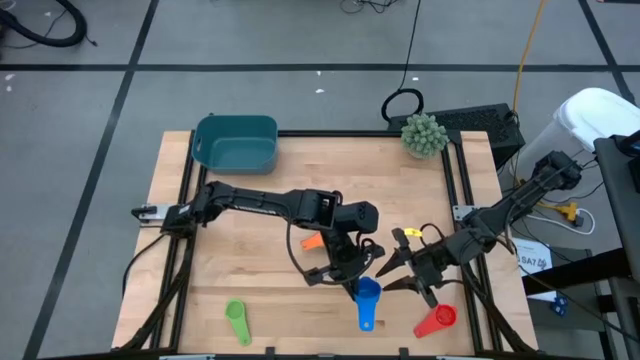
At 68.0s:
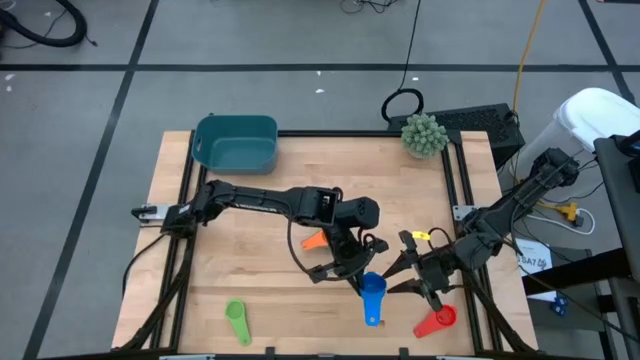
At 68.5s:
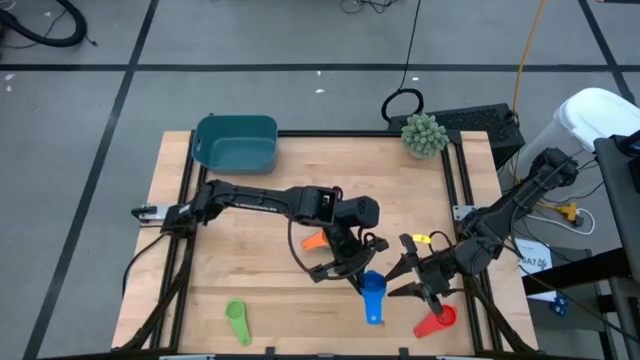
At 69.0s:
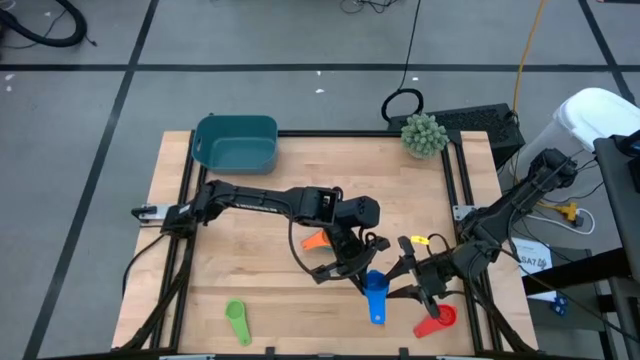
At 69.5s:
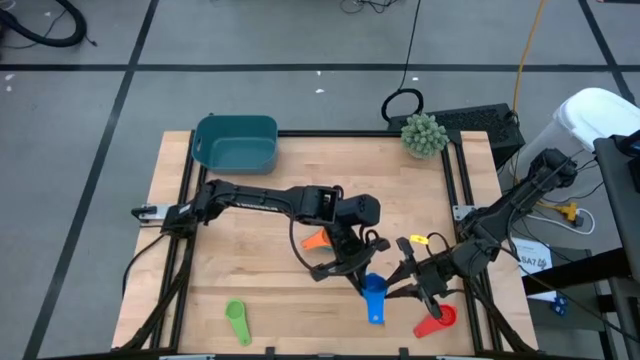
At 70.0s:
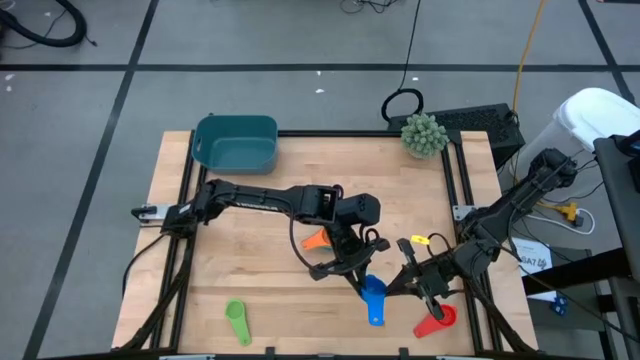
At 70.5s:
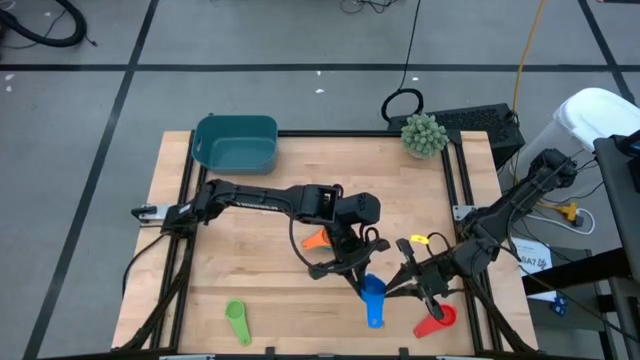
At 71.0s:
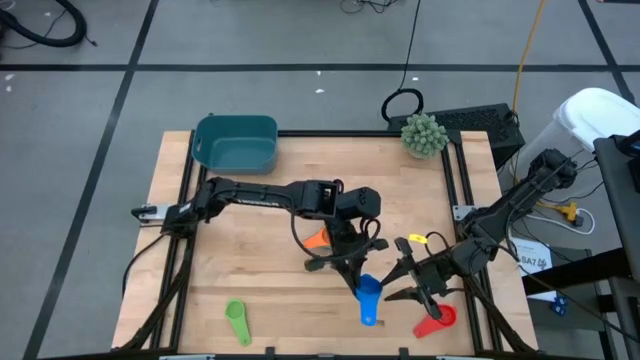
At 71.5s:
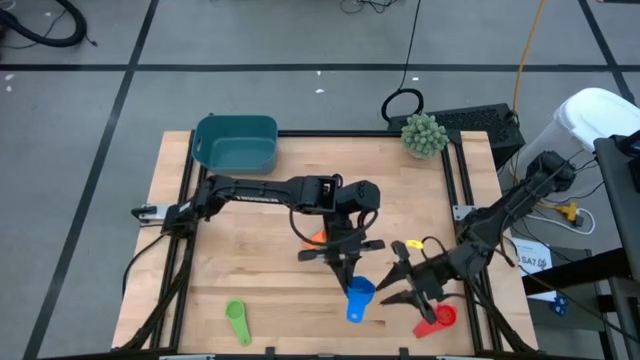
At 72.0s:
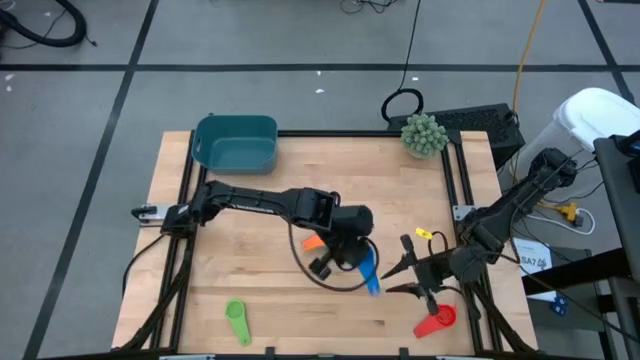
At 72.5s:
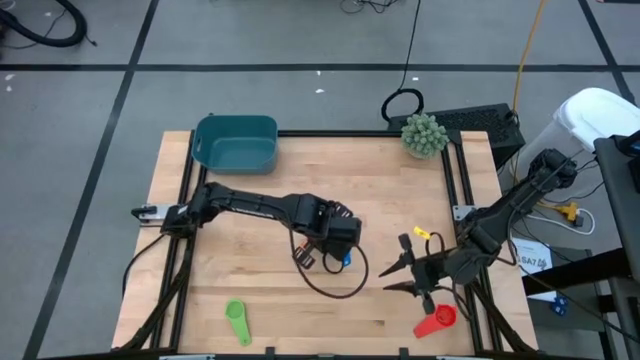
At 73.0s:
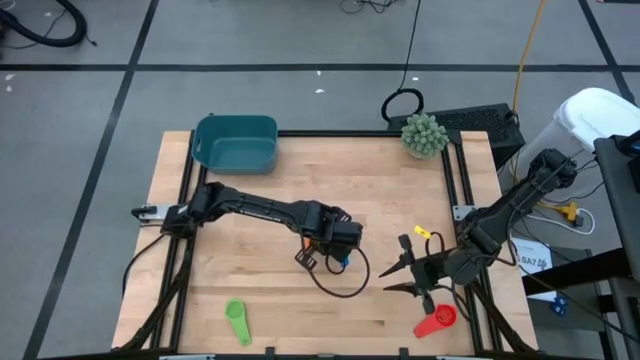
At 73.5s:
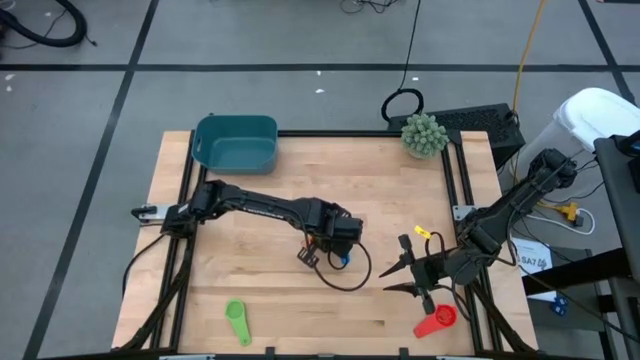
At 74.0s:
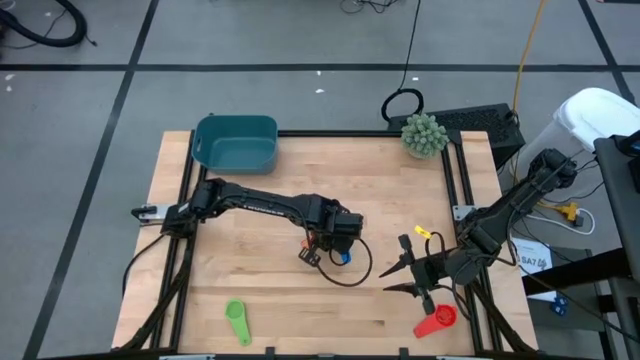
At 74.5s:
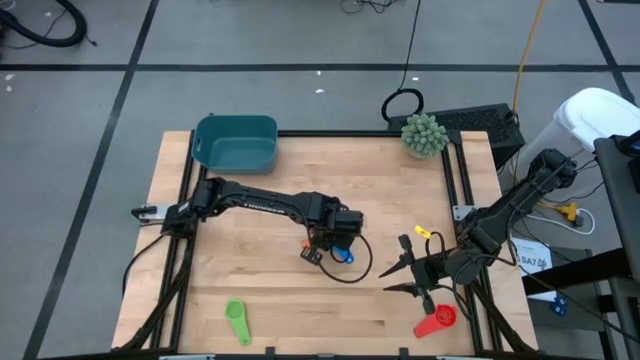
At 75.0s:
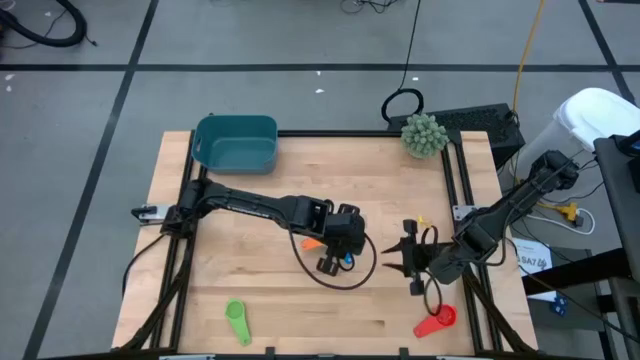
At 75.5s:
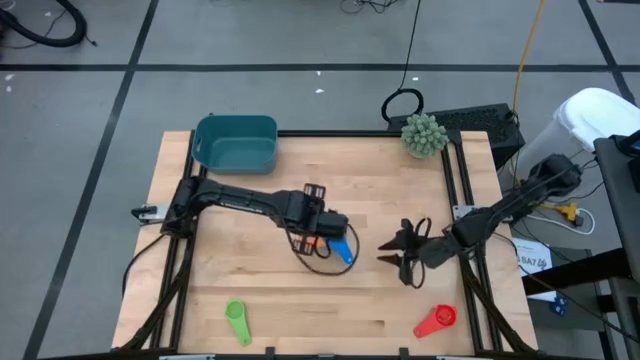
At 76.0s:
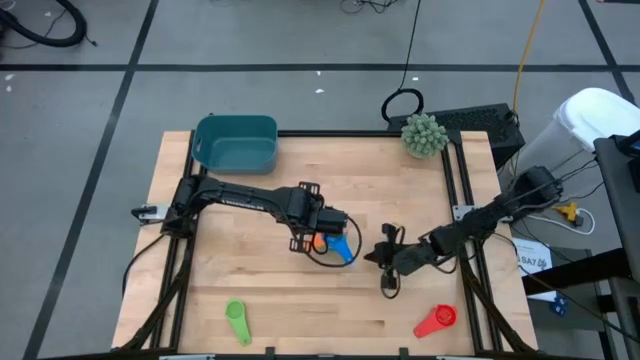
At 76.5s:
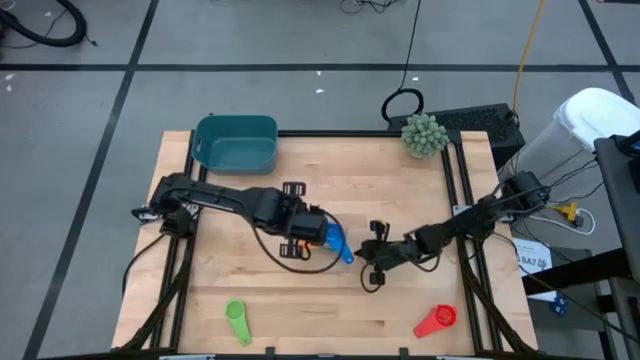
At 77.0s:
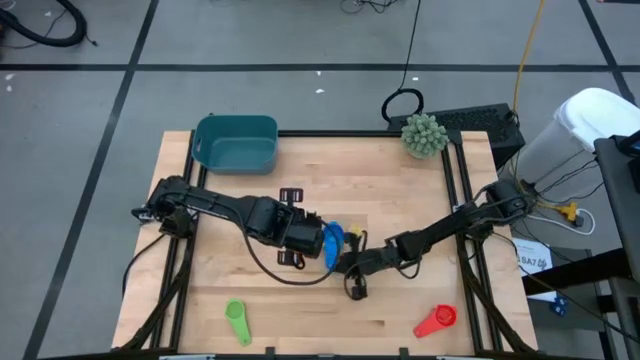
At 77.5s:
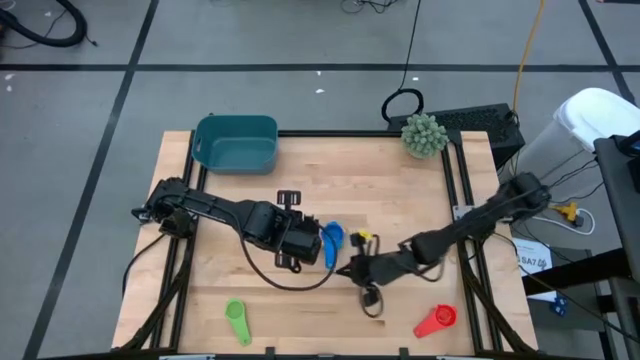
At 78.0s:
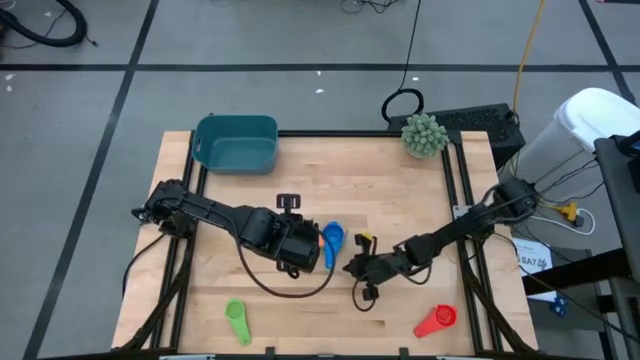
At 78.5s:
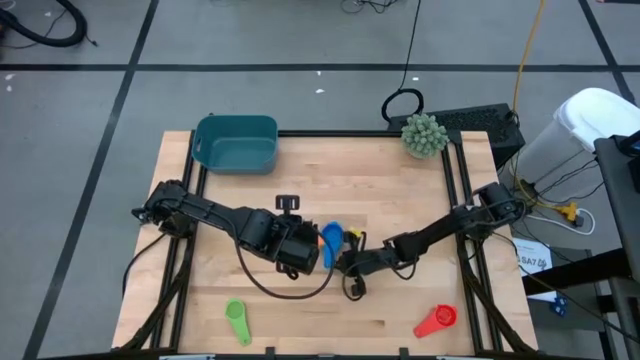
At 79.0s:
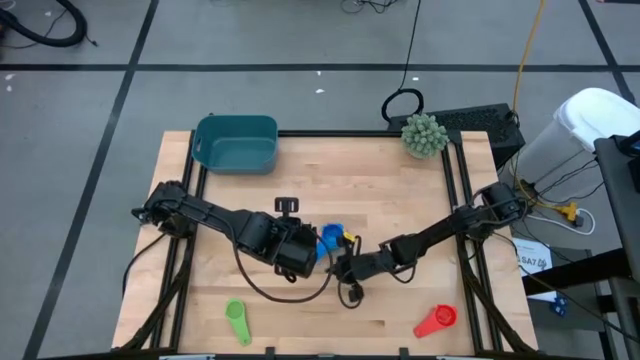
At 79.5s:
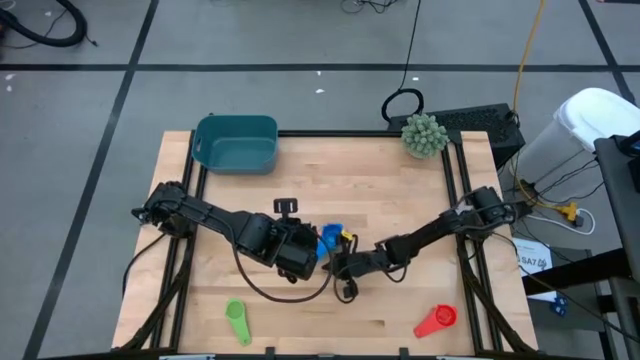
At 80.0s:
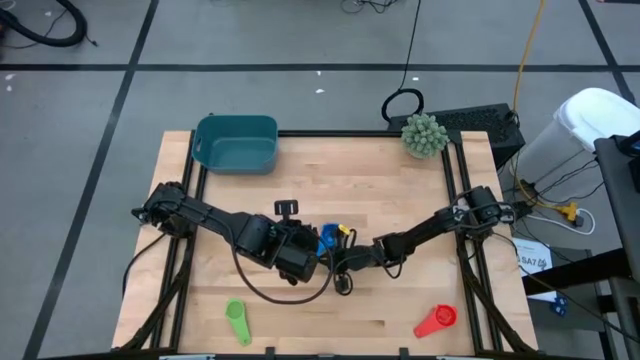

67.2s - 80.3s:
Task: Nest measuring cups in basket
Stack the blue measuring cup on top of the orange measuring cup

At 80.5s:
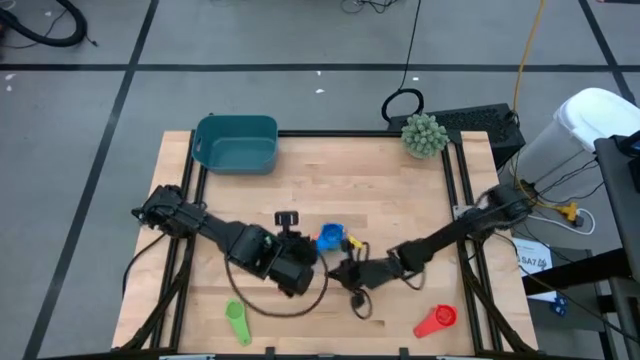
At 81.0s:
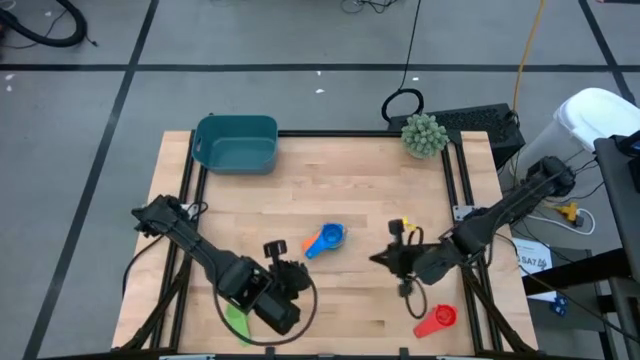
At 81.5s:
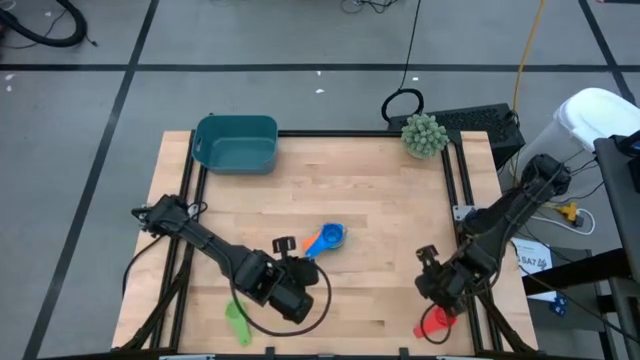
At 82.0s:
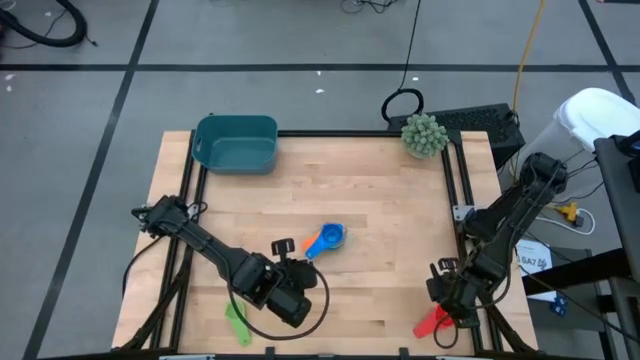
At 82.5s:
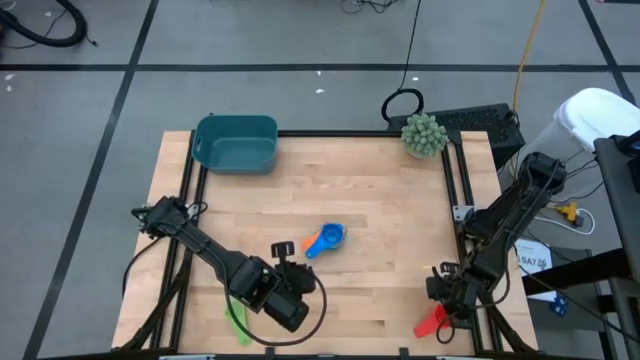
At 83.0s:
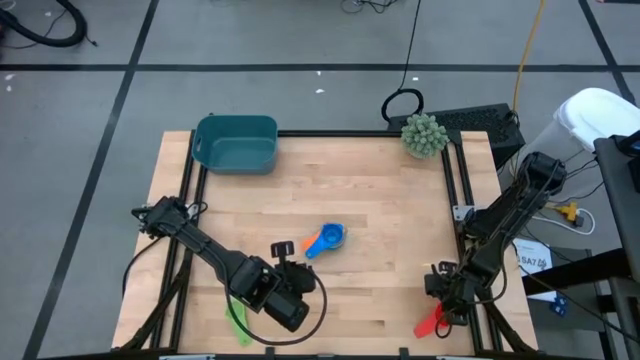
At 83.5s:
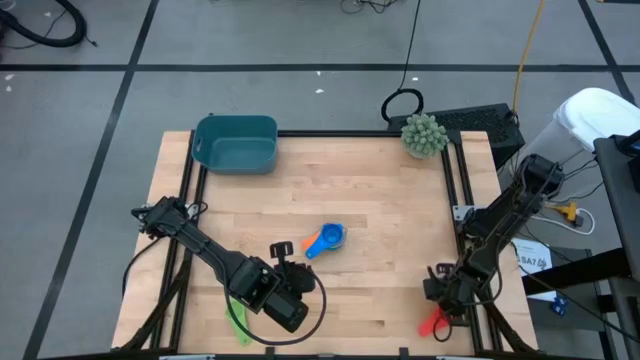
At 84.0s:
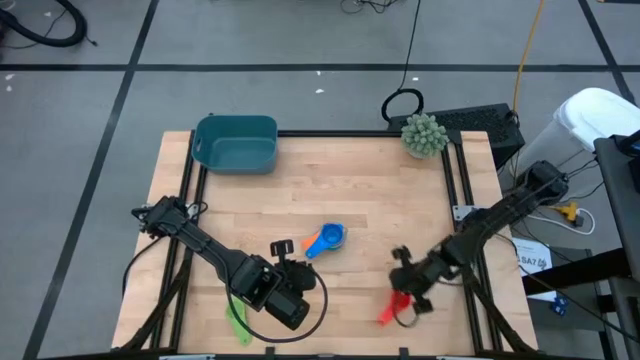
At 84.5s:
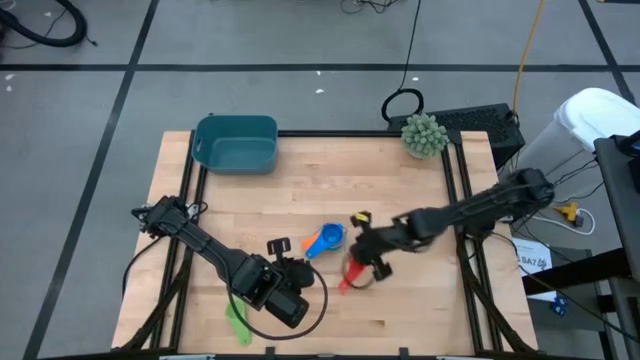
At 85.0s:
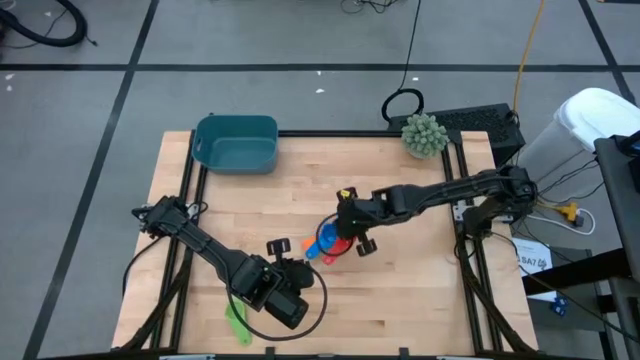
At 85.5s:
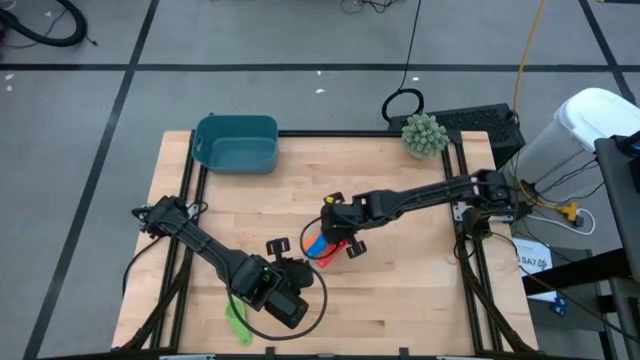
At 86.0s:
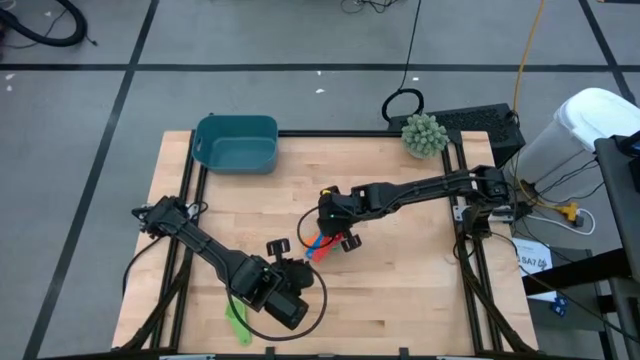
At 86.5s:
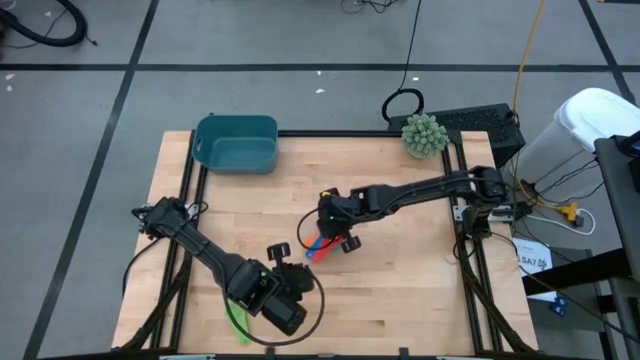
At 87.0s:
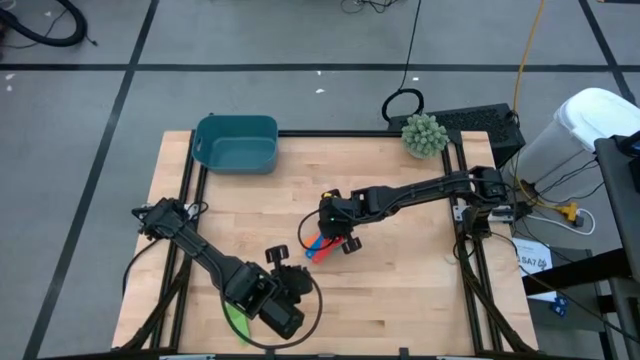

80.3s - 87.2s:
Stack the red measuring cup on top of the blue measuring cup

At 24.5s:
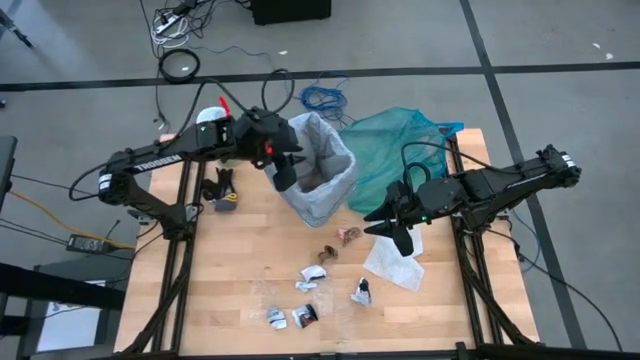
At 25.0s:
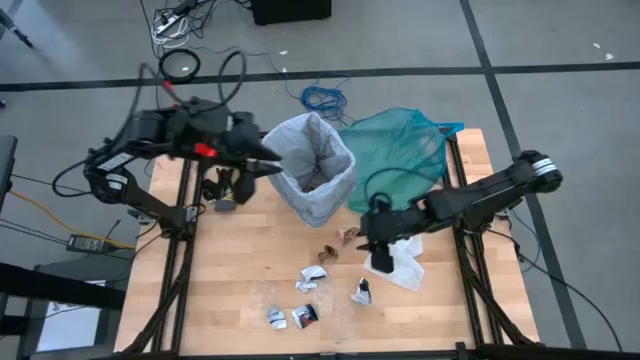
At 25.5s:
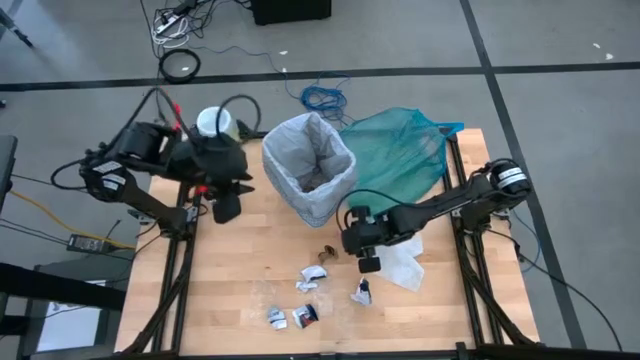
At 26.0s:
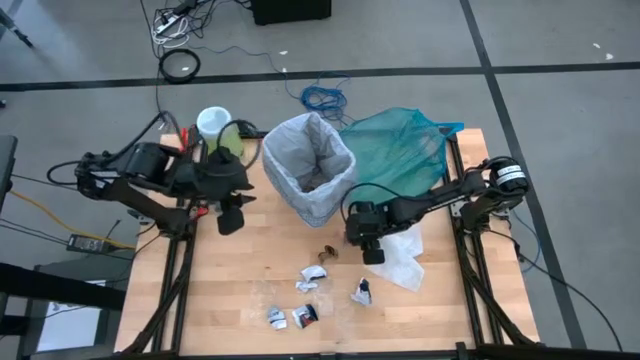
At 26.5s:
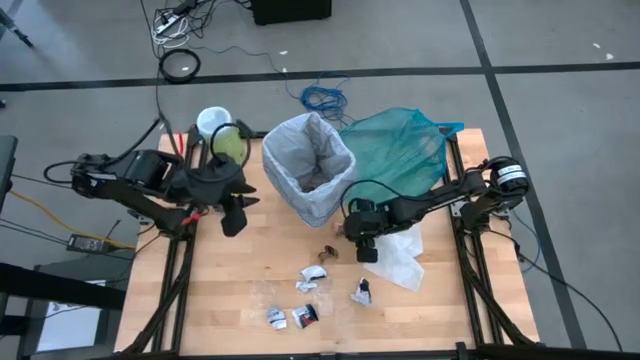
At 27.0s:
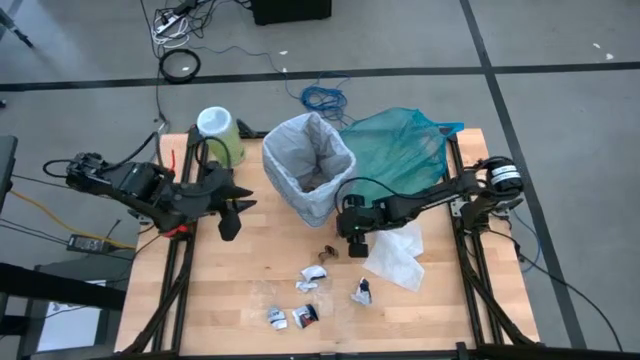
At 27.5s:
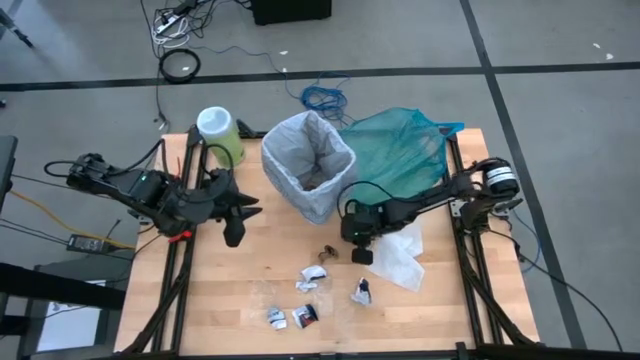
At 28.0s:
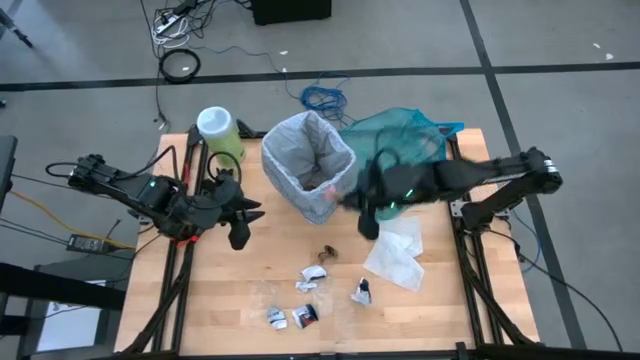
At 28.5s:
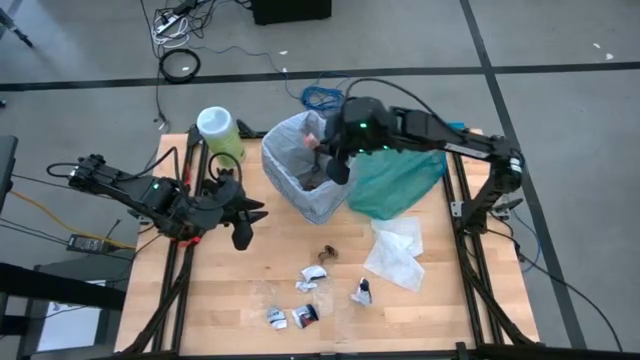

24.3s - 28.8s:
Task: place trash/remove bag and relplace
Put the brown napkin into the trash bin
